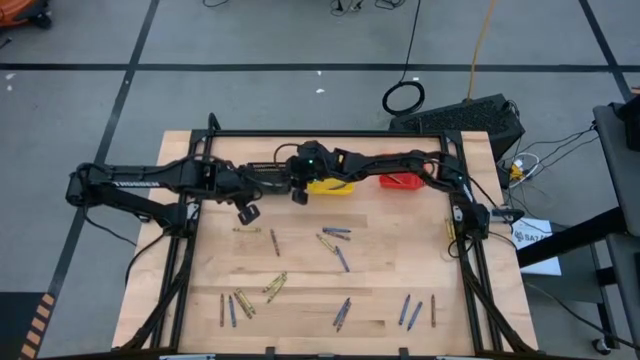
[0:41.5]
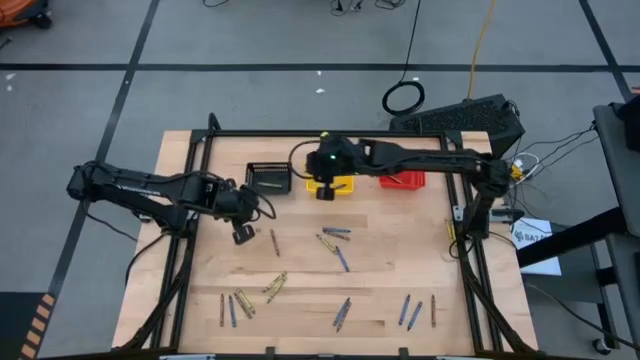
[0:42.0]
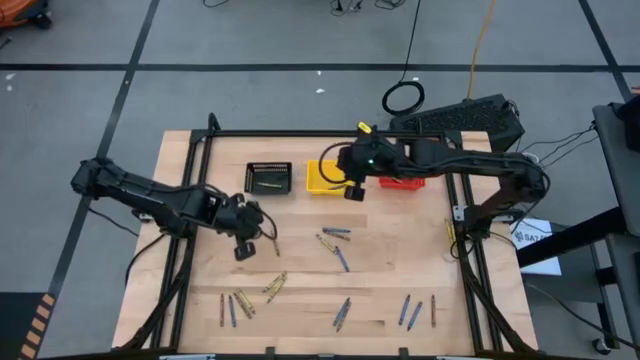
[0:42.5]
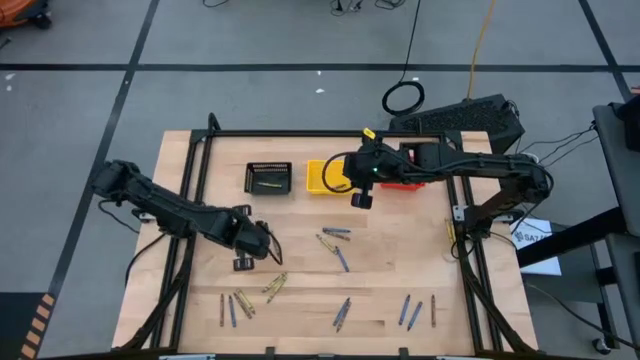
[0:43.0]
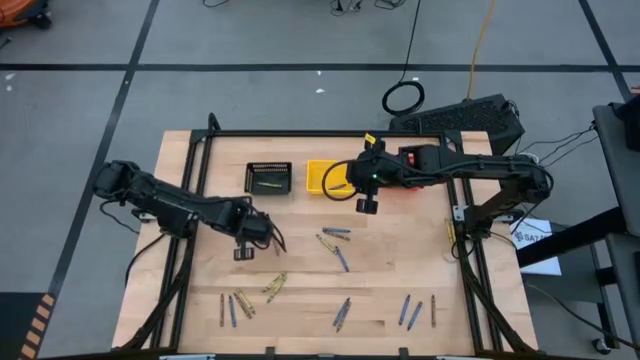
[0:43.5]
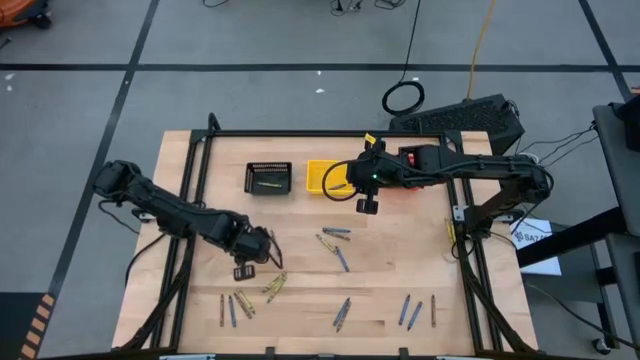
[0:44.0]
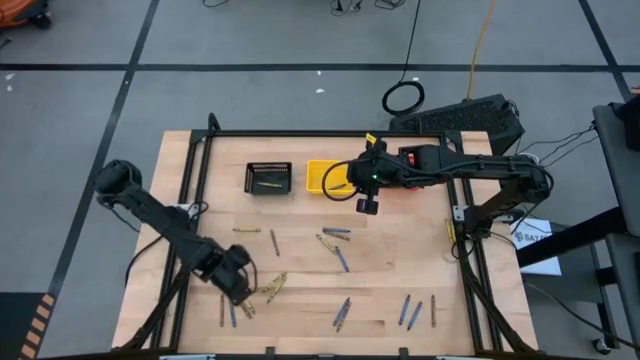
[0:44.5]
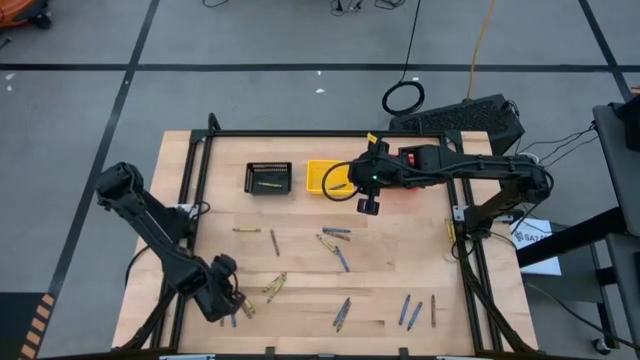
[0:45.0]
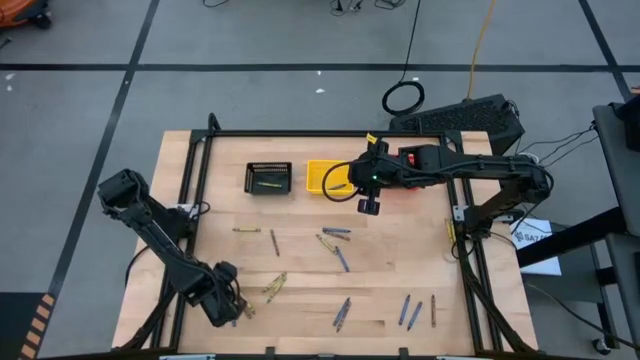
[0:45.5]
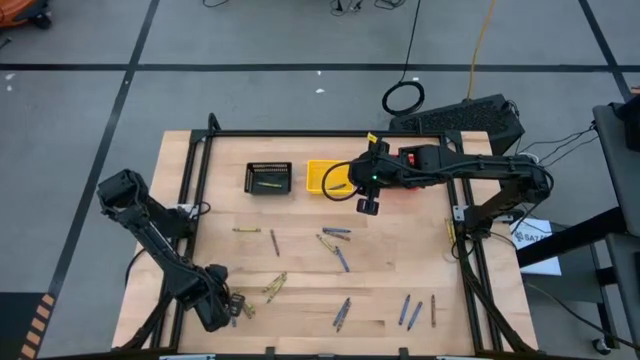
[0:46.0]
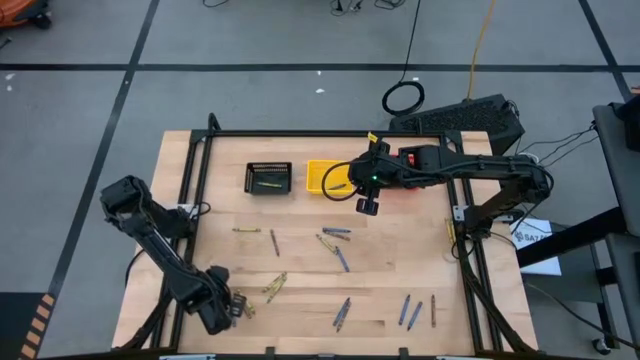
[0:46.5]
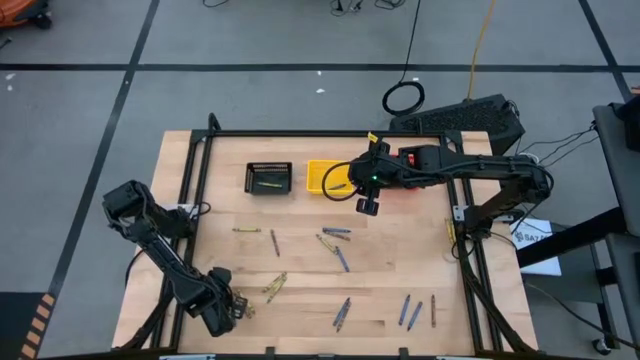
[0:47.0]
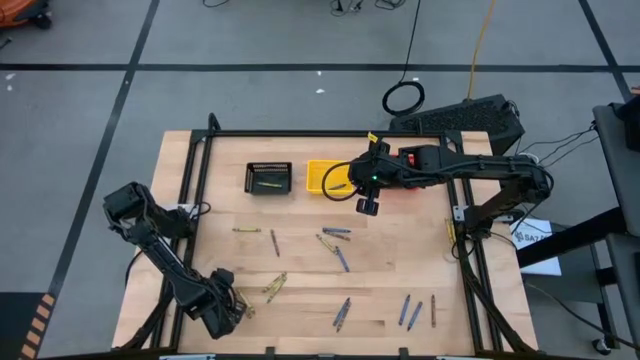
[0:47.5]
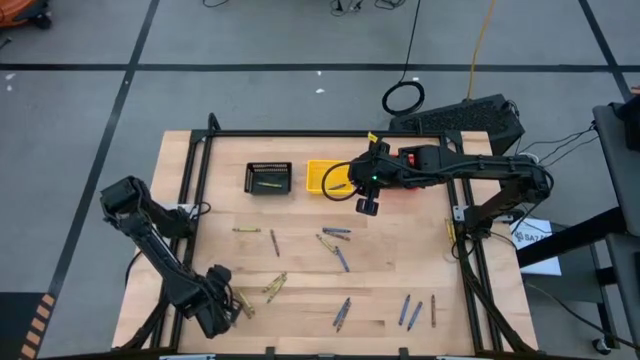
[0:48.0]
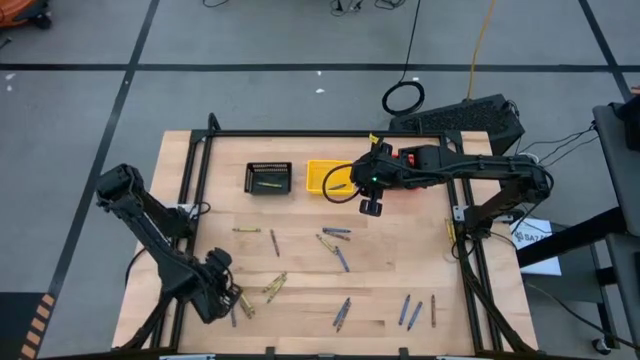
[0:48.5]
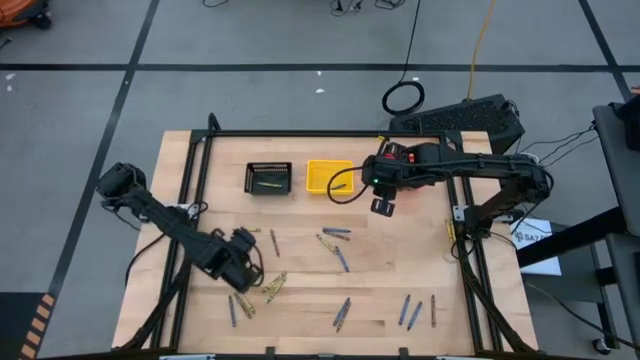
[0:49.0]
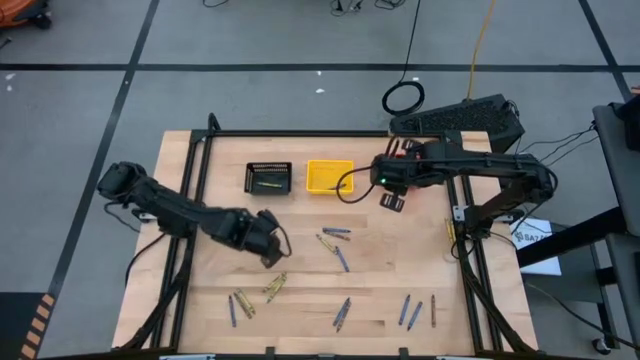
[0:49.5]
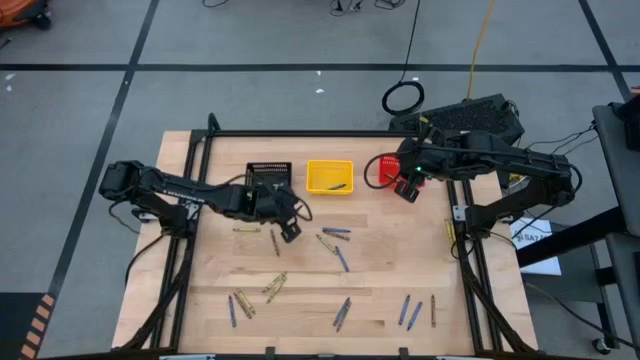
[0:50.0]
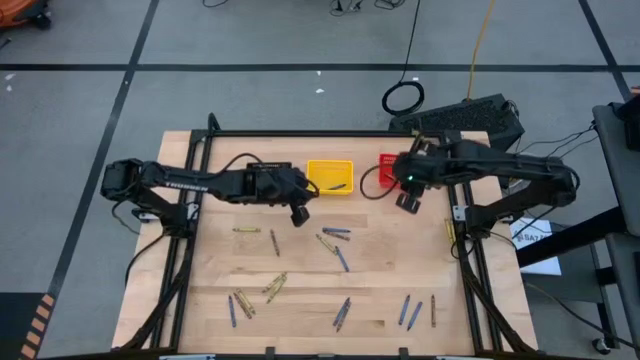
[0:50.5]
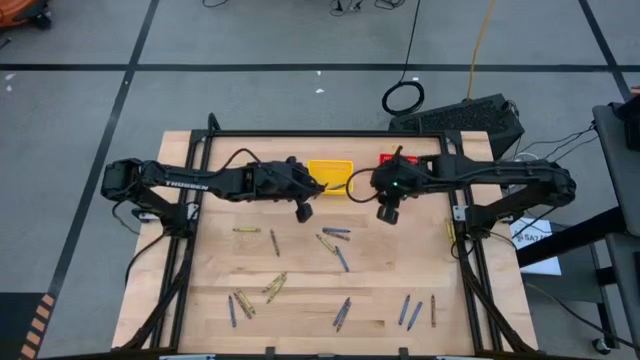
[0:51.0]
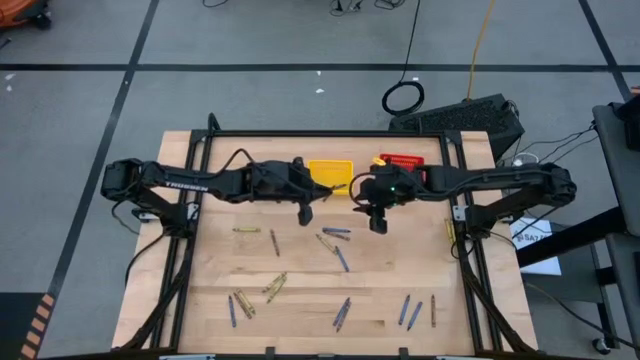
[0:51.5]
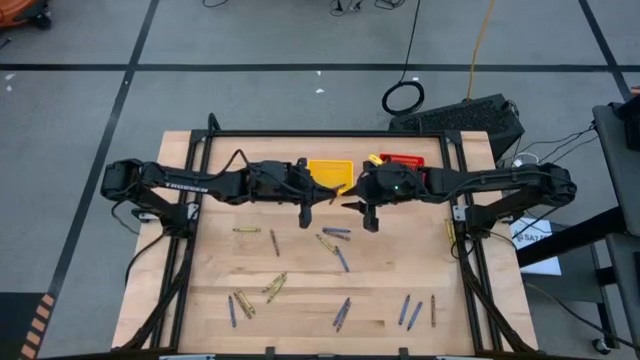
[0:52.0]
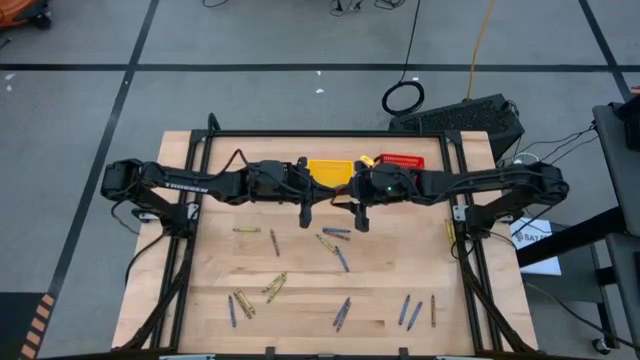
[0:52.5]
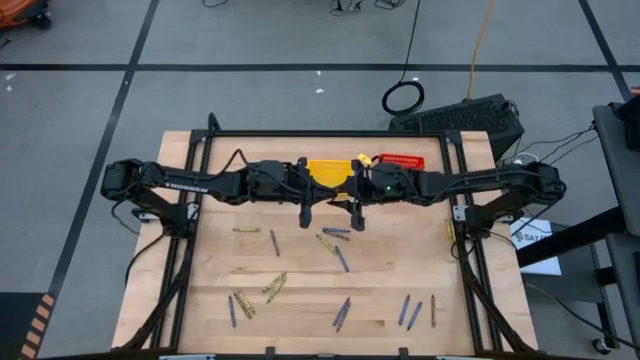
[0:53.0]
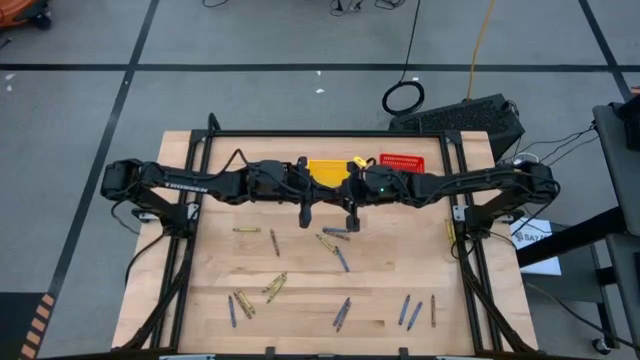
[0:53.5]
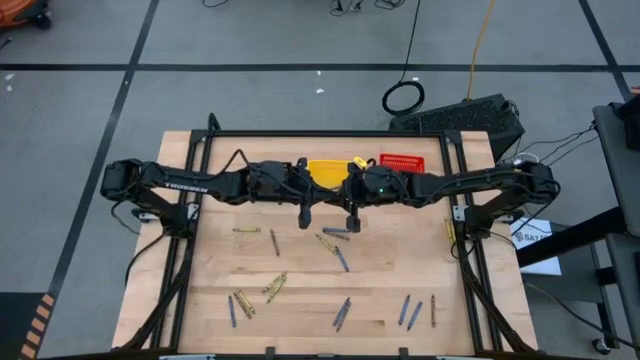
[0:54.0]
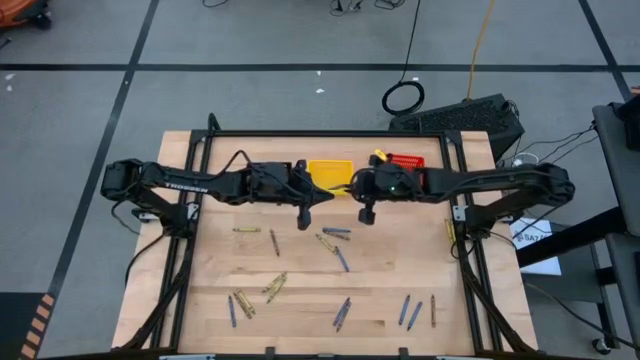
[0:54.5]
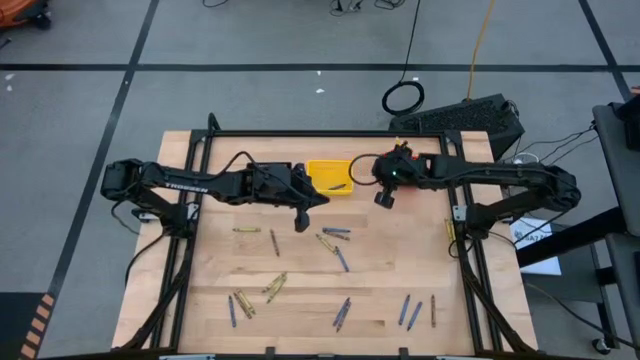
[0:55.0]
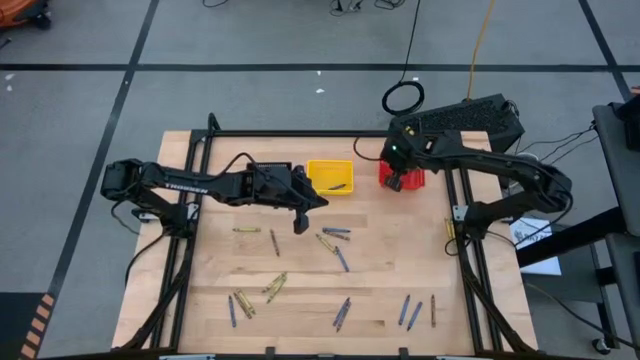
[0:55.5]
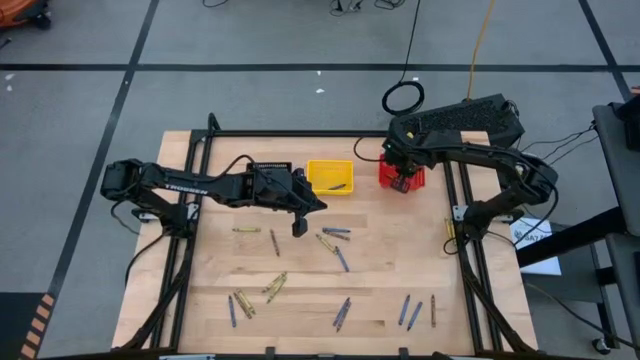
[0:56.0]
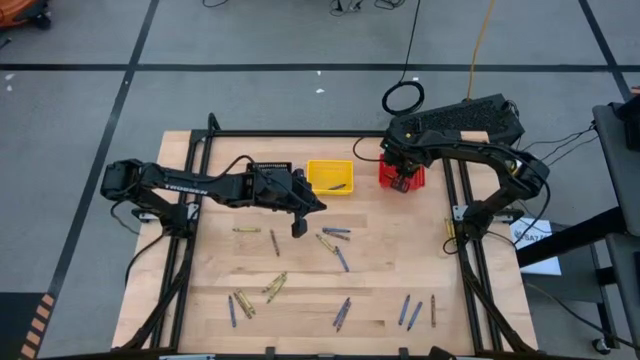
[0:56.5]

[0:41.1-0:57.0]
Task: Sort crayons
Put the brown crayon into the red bin

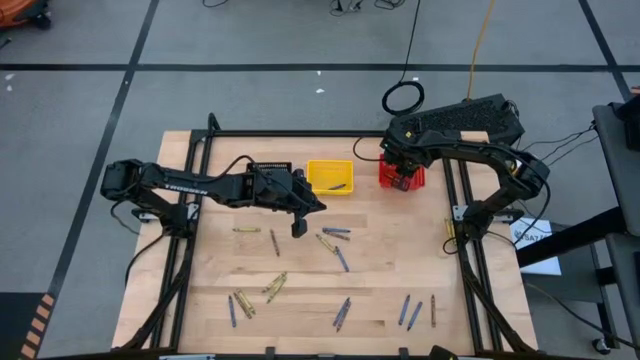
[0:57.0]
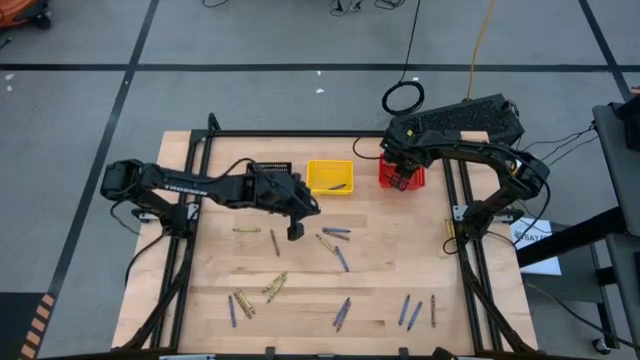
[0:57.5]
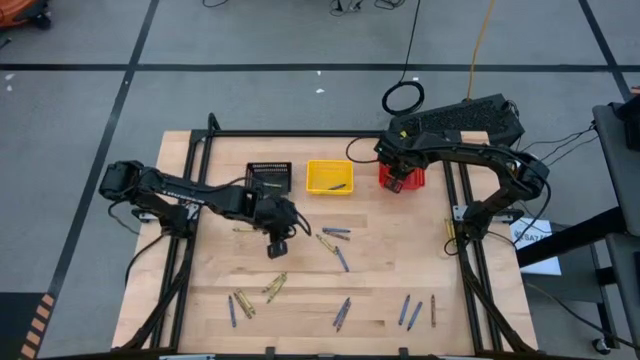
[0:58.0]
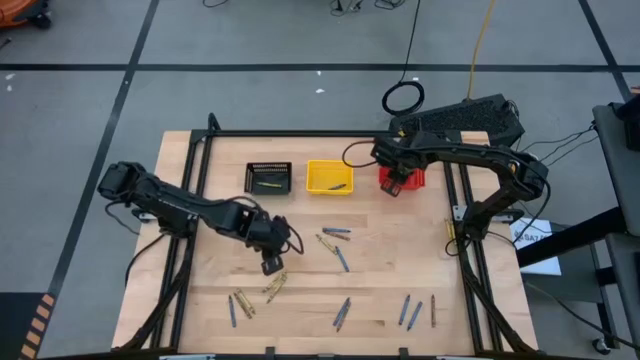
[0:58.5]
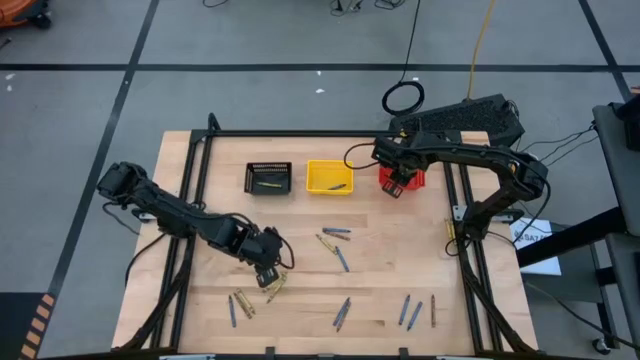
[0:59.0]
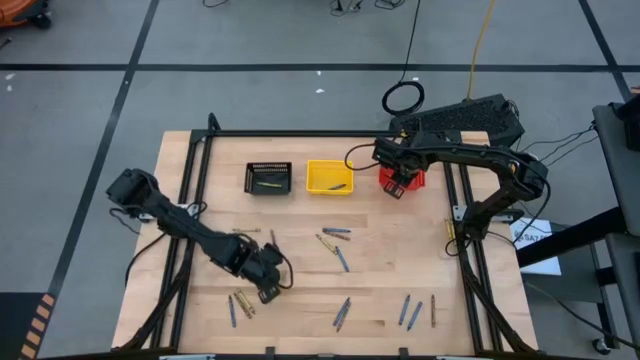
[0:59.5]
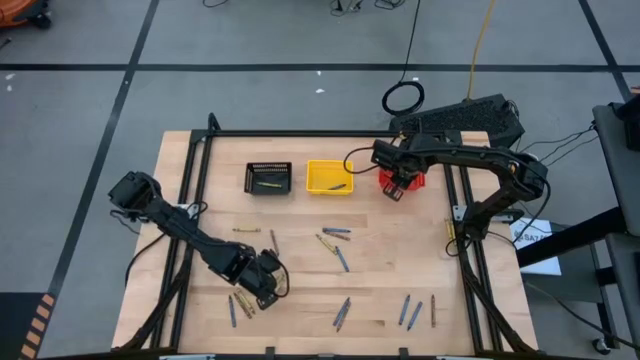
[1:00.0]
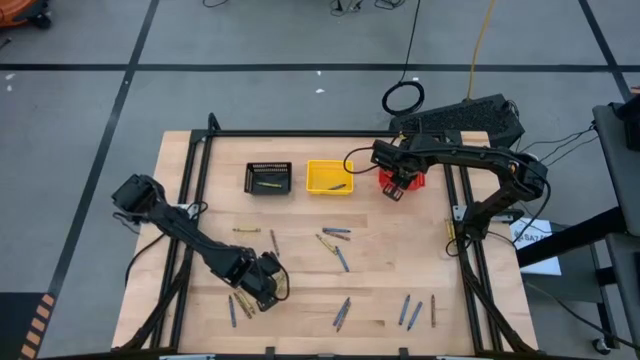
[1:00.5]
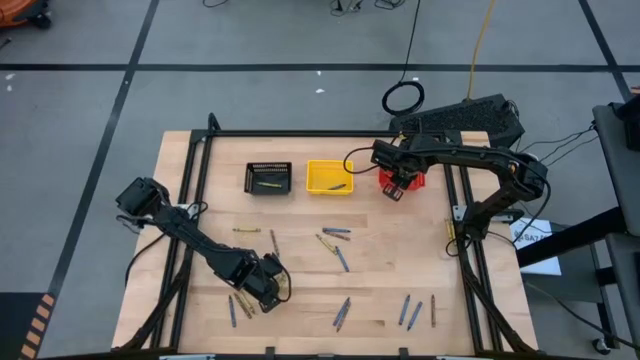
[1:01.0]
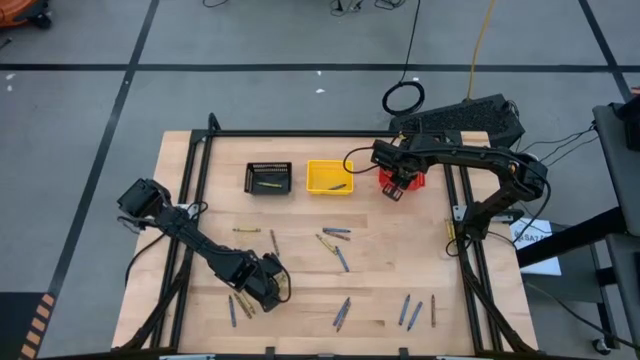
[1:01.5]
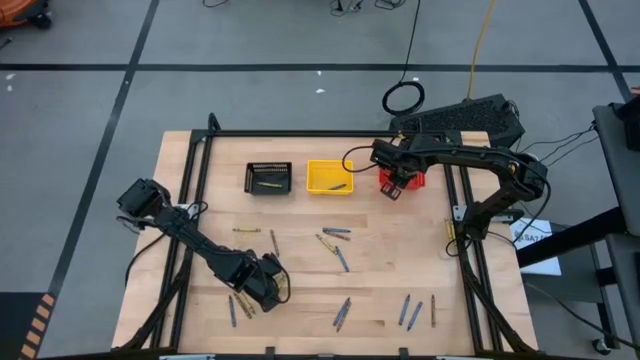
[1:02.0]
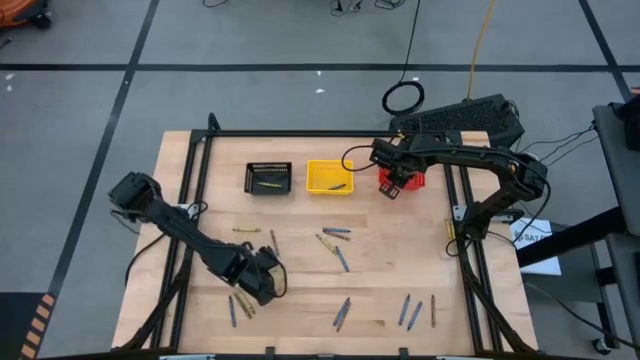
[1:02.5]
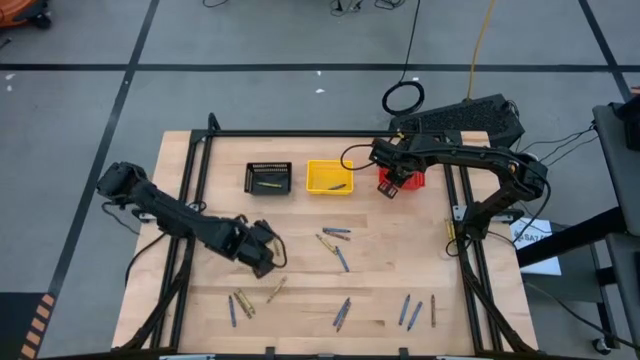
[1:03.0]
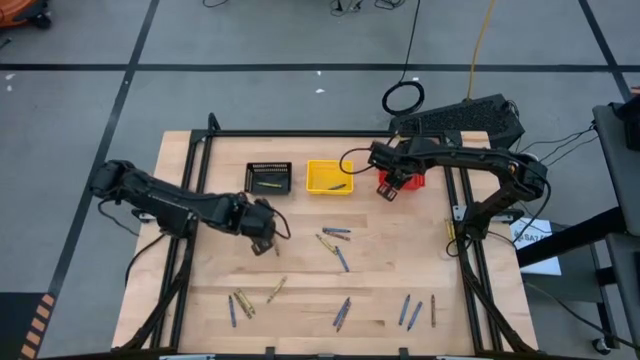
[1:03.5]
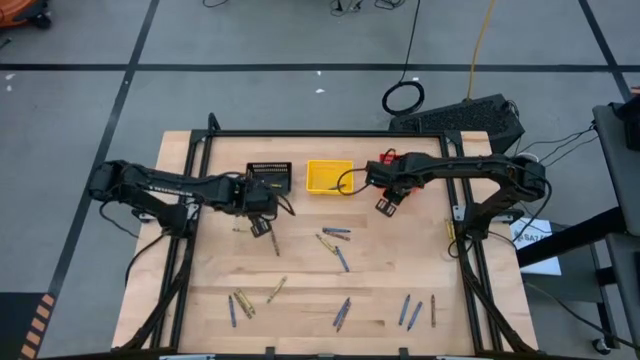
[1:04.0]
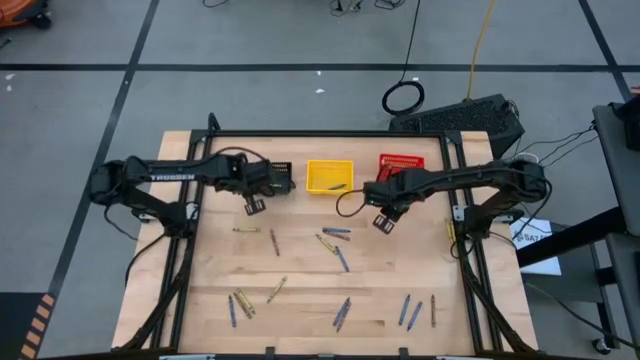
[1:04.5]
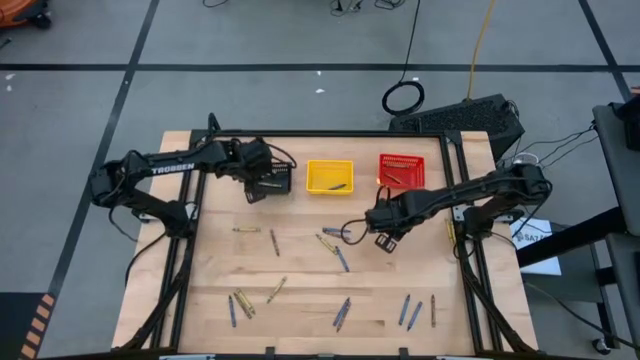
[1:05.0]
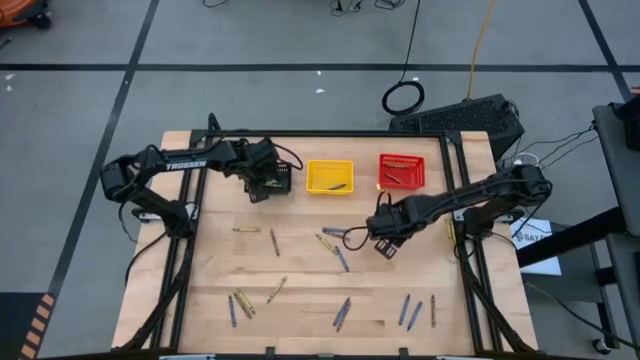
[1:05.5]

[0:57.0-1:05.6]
Put the green crayon into the black bin
